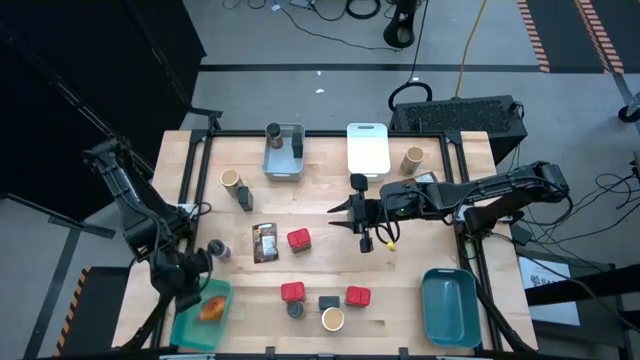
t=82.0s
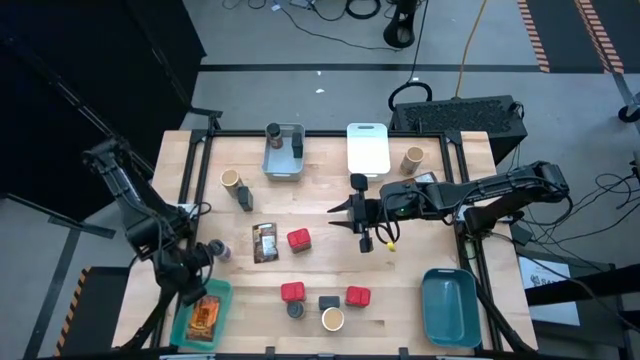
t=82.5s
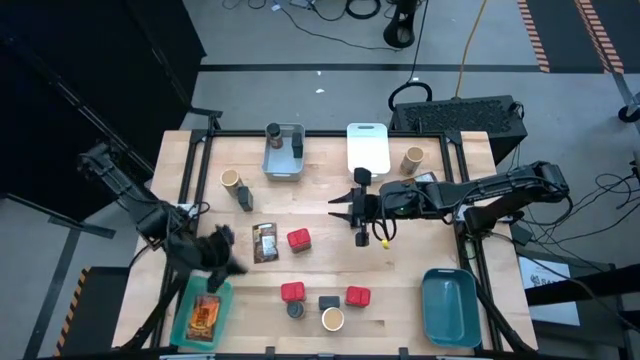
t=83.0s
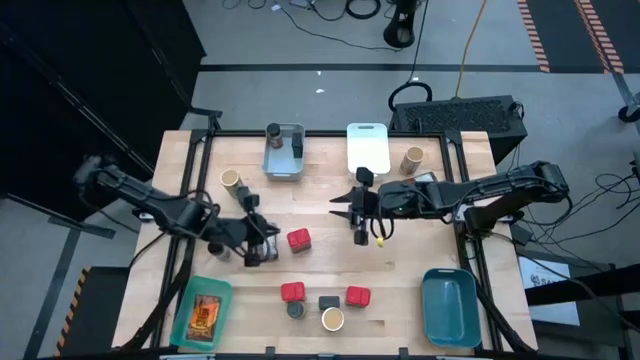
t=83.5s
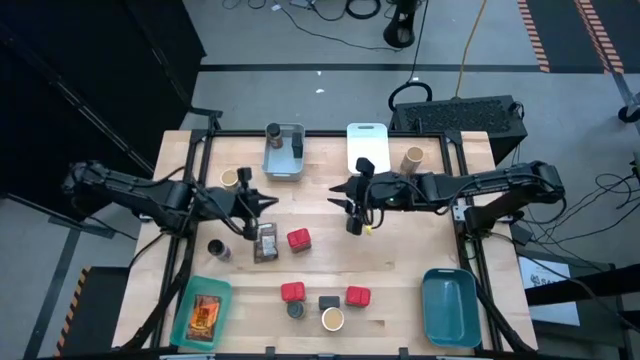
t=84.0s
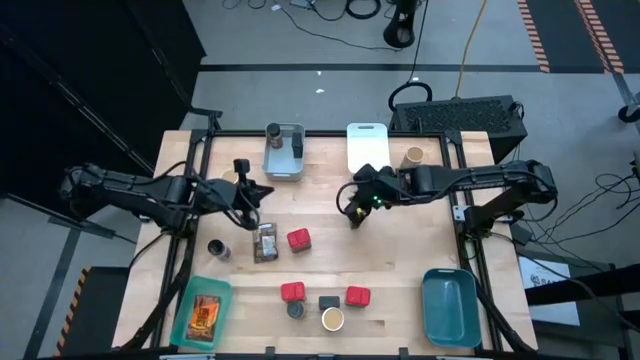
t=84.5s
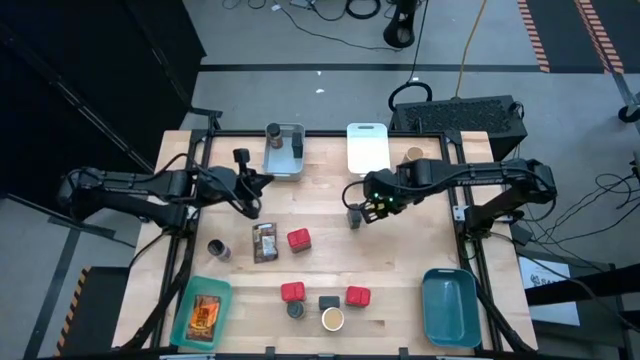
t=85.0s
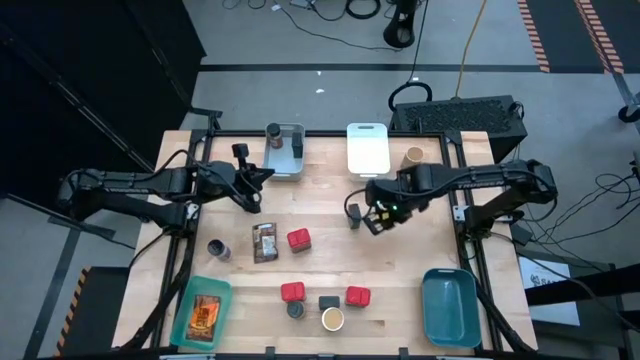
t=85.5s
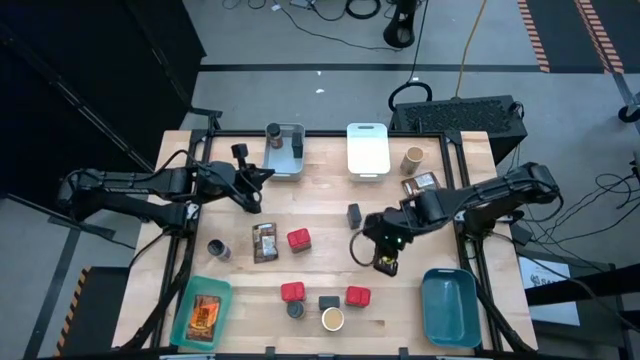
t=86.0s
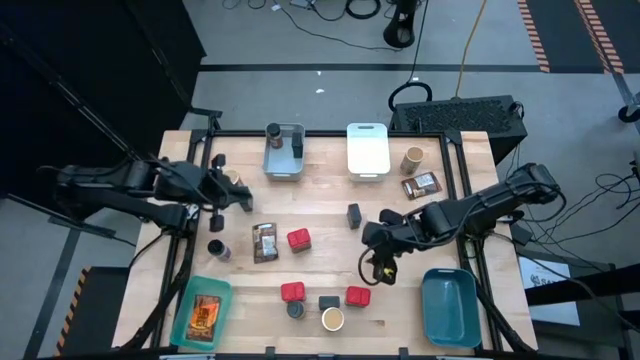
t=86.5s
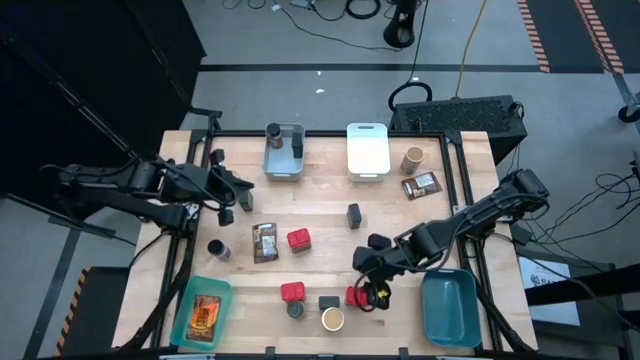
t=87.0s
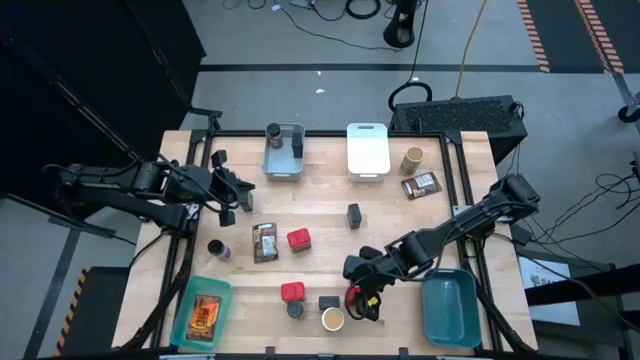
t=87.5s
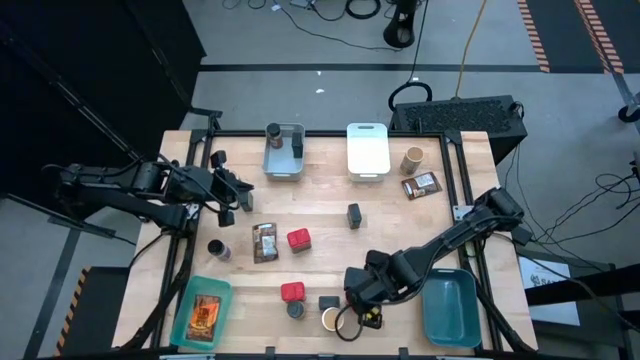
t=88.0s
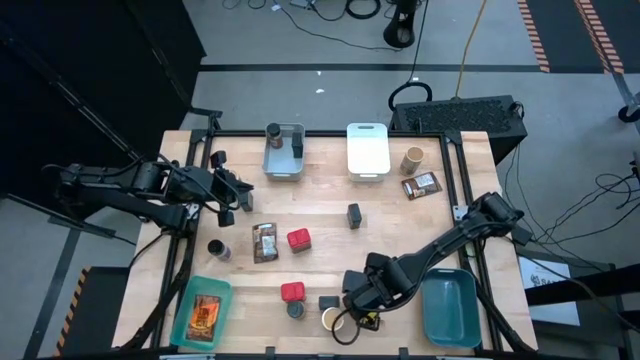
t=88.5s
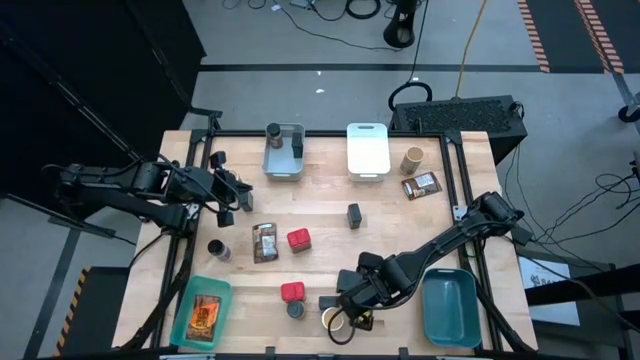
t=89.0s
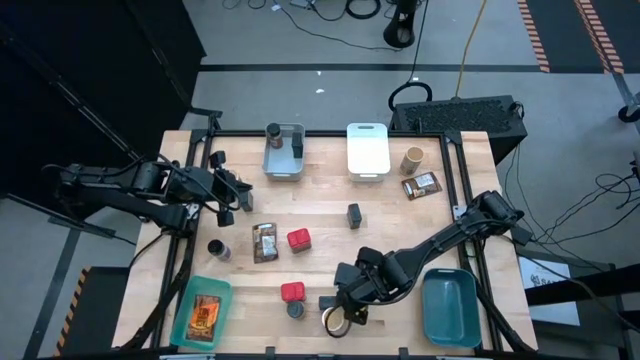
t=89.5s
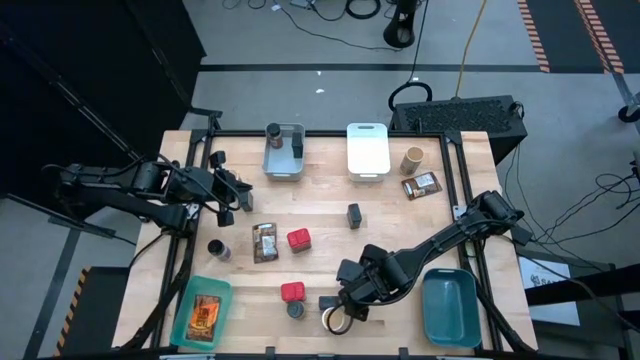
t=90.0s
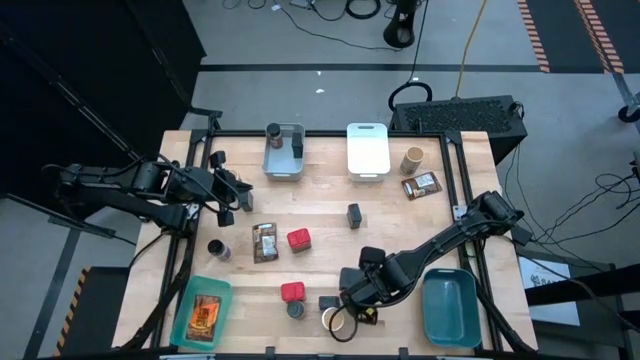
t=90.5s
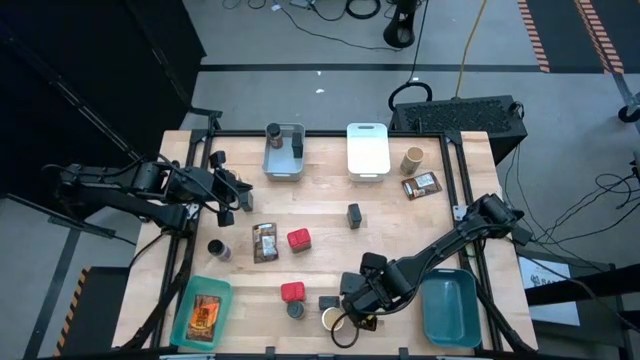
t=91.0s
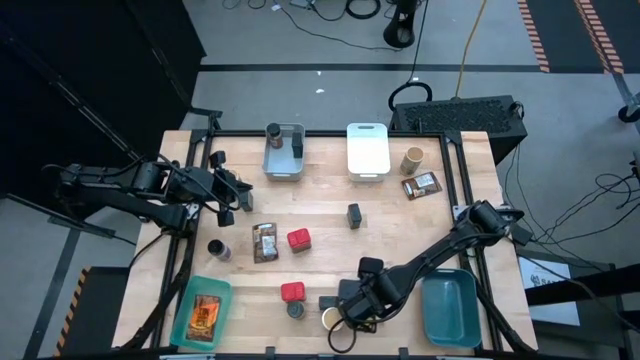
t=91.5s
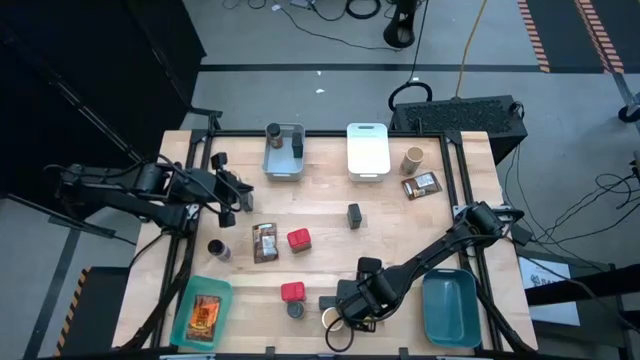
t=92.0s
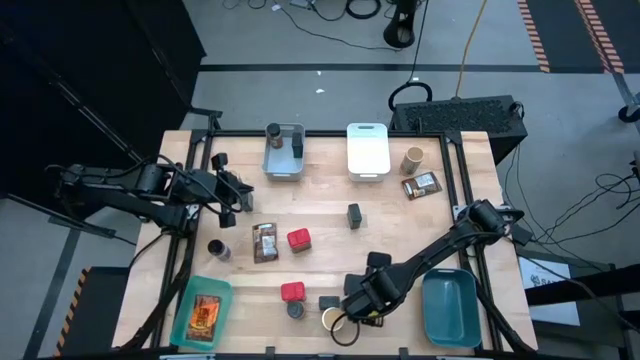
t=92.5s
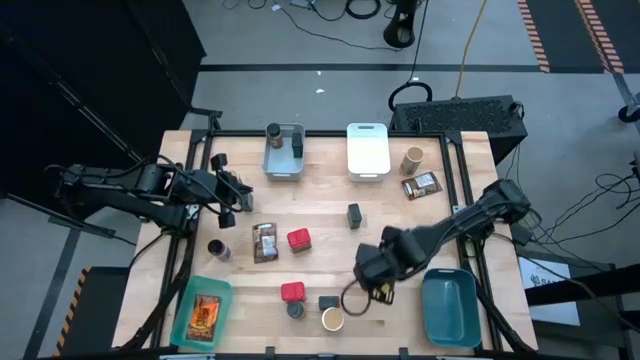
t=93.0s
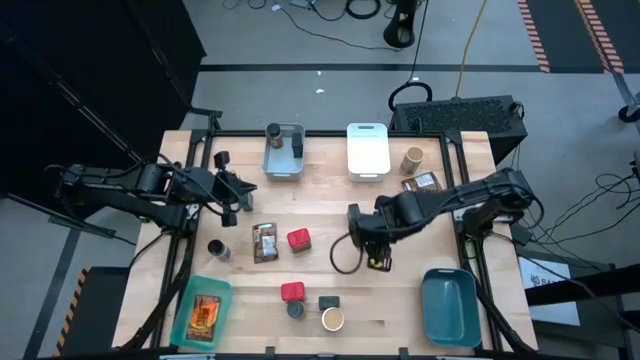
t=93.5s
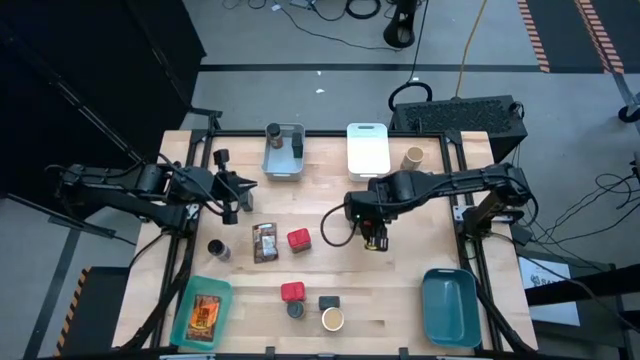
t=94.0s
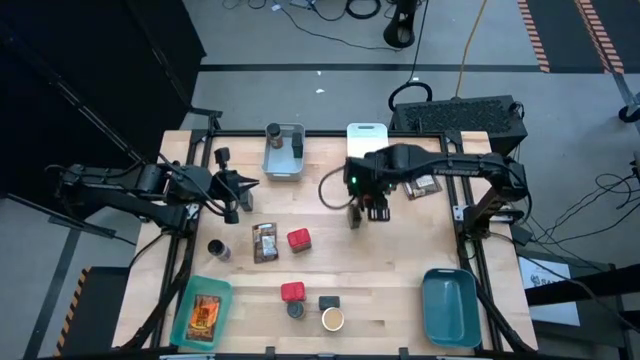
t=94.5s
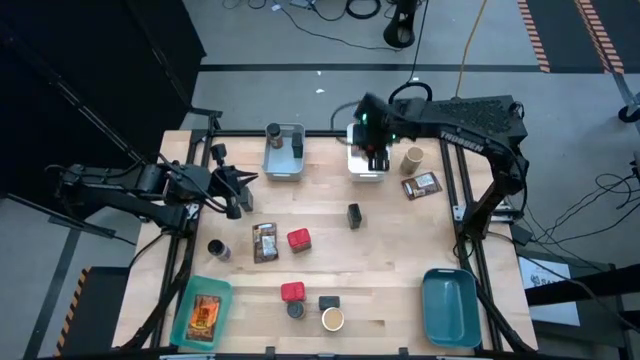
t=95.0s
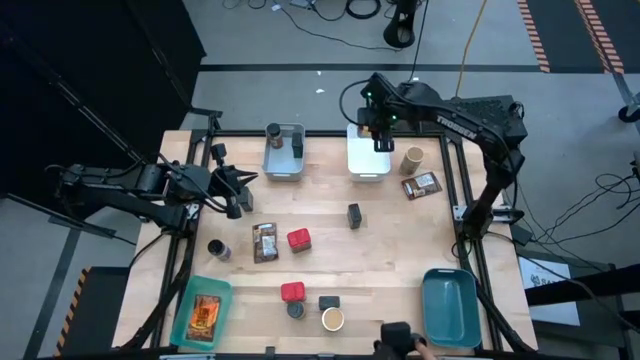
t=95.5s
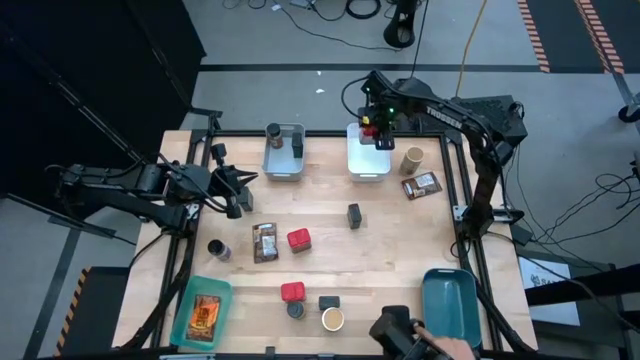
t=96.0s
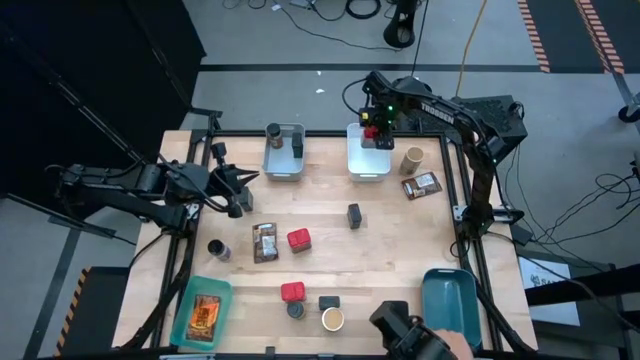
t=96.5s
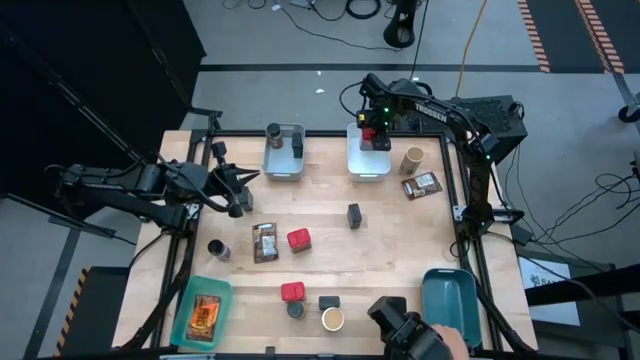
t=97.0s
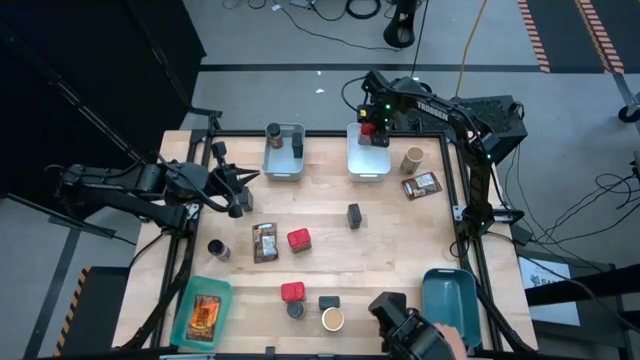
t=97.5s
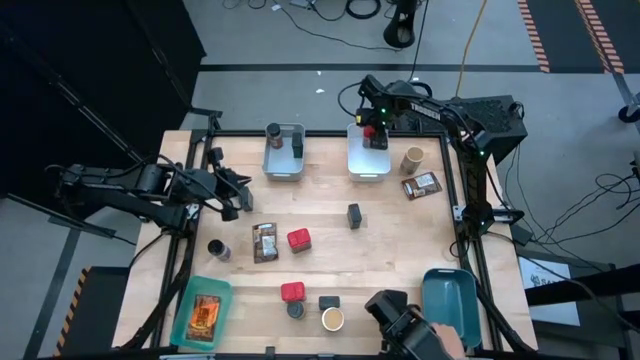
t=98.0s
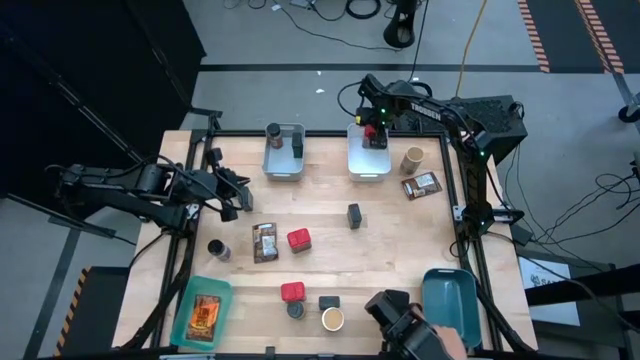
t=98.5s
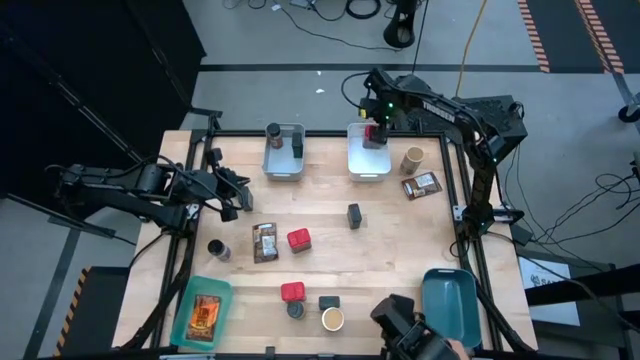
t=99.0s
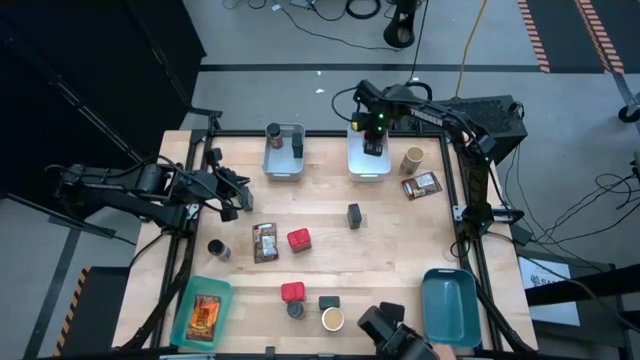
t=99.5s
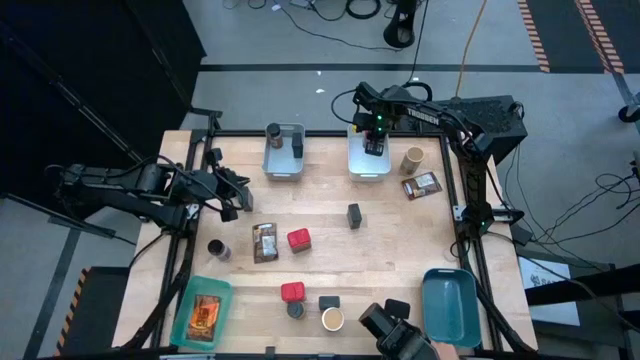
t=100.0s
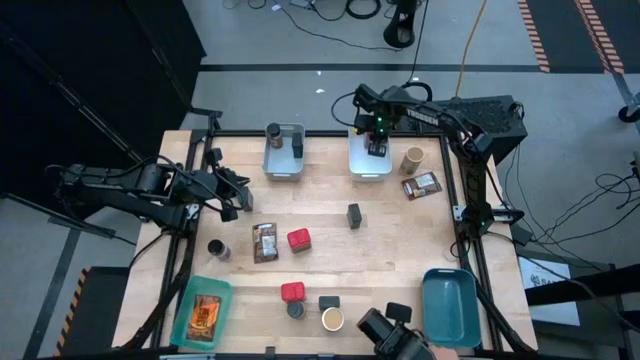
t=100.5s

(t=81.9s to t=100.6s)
Task: Sort spices by type
Put the red spice can into the white bin

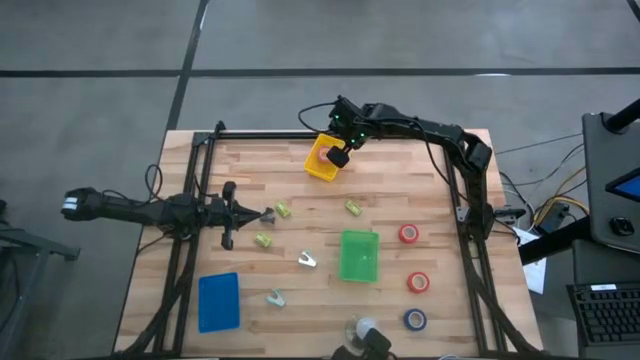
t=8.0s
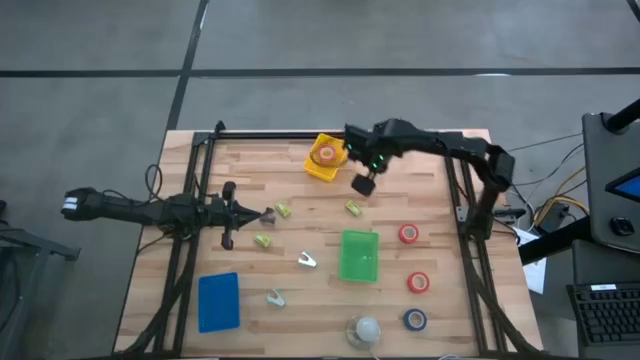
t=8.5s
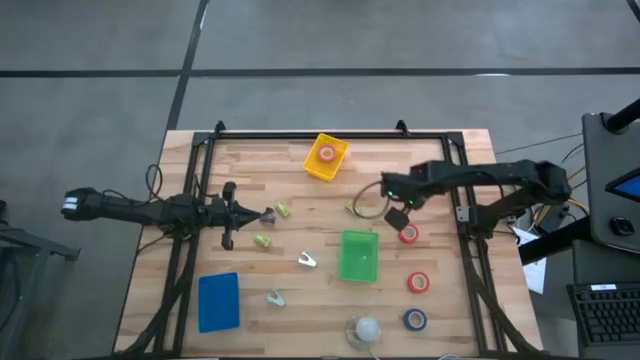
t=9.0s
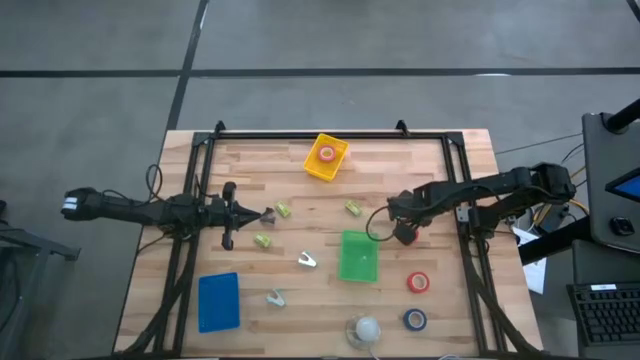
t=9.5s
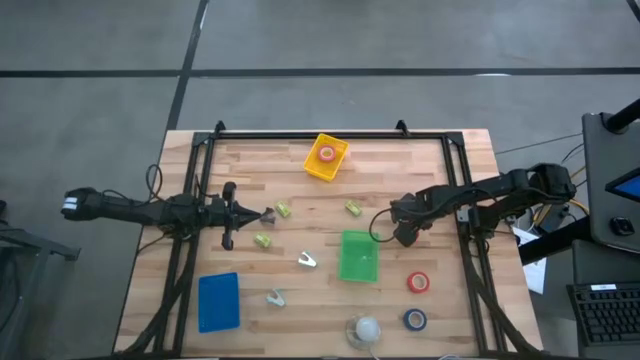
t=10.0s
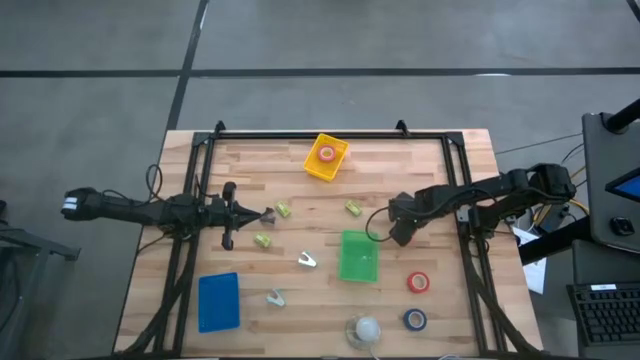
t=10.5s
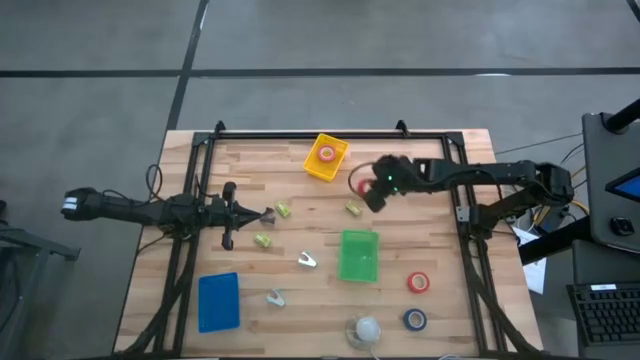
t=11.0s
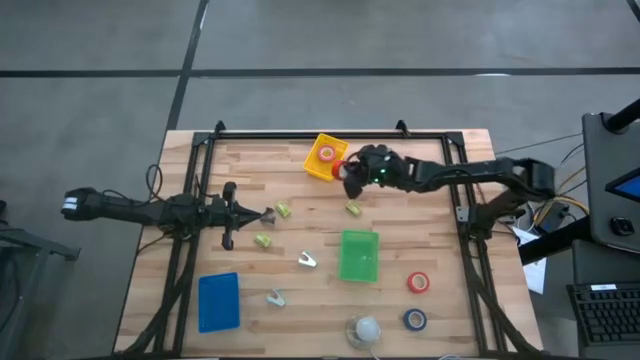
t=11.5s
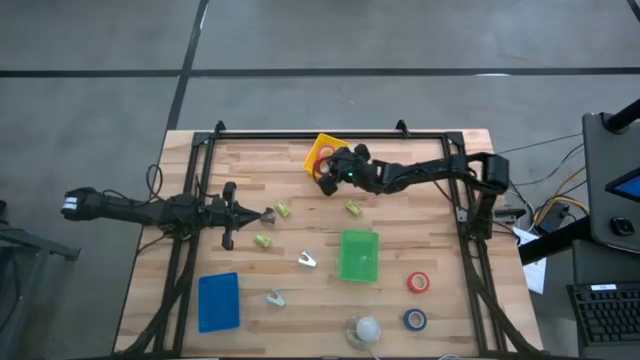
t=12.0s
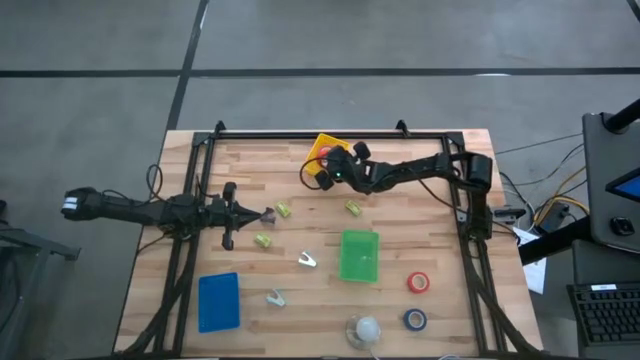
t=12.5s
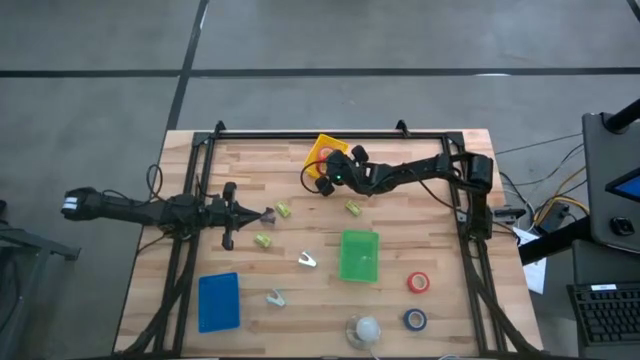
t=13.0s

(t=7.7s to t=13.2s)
Task: Pick and place Stapler, Stapler remover, tape
Put the top orange tape into the yellow bin
